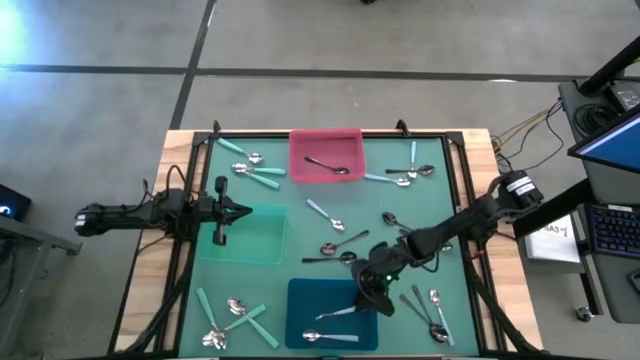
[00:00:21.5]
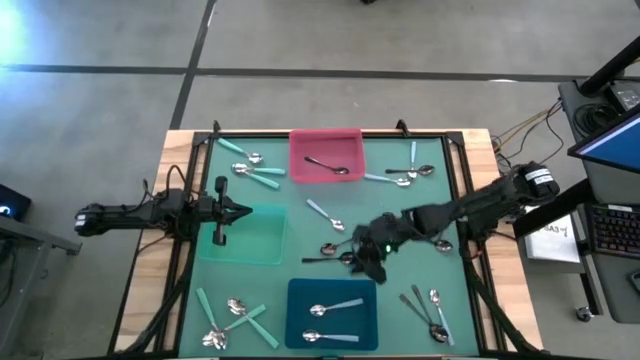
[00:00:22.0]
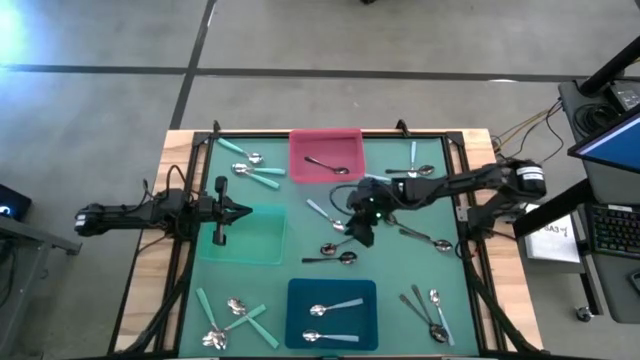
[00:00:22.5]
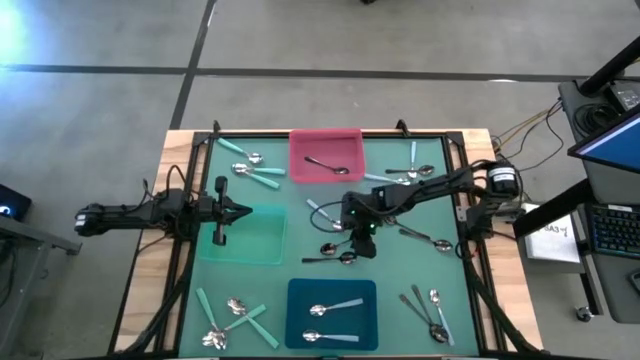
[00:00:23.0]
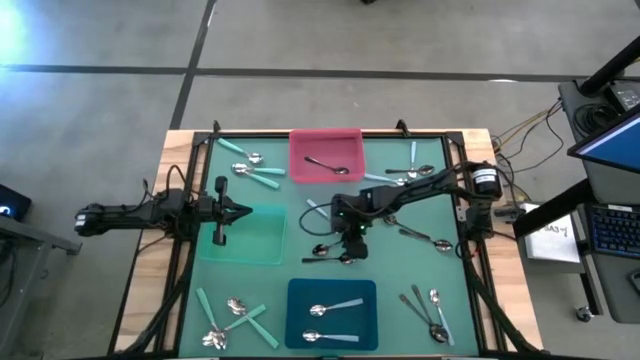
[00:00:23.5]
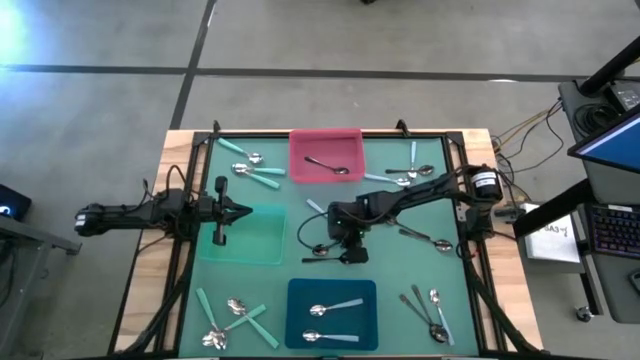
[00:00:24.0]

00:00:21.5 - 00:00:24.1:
Task: Sort silverware by color (type)
Put the black spoon into the red bin

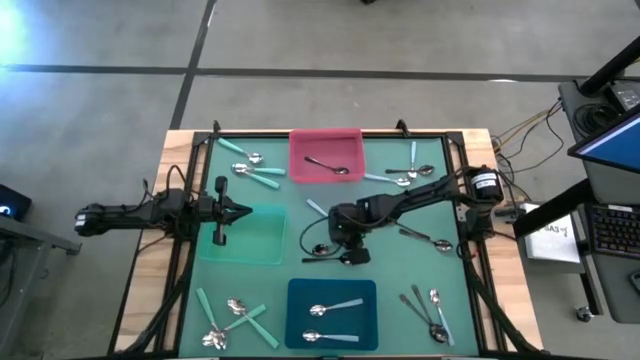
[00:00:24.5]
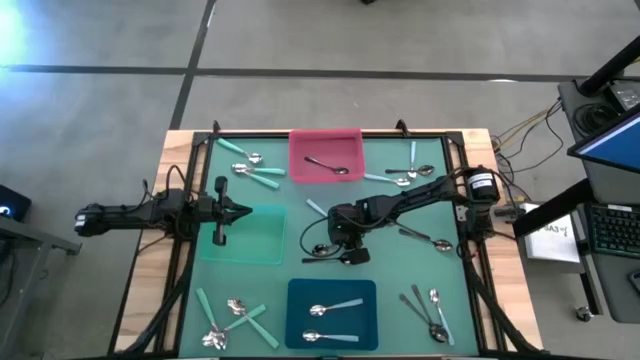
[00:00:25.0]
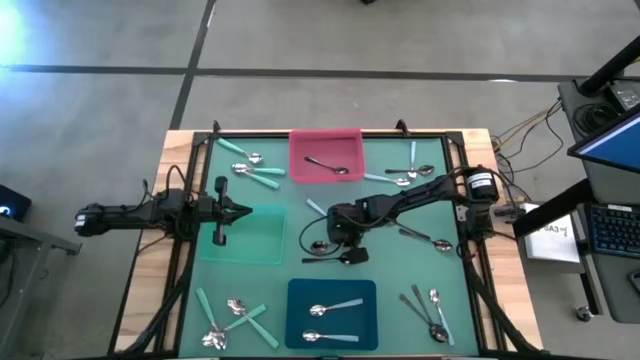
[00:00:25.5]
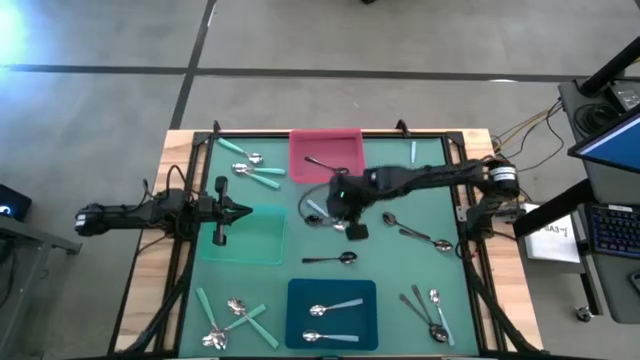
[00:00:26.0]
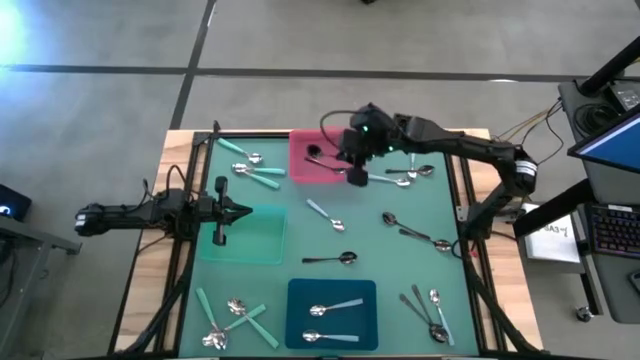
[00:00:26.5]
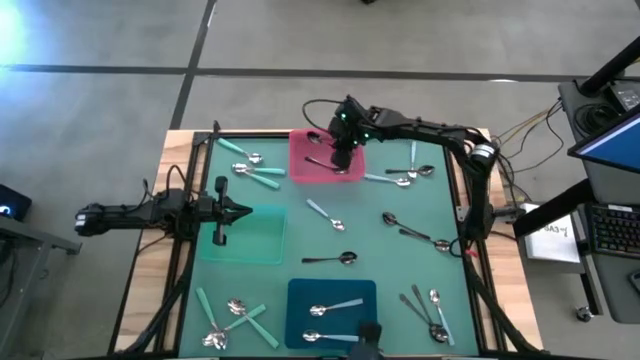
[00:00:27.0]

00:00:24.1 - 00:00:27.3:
Put the black spoon into the red bin

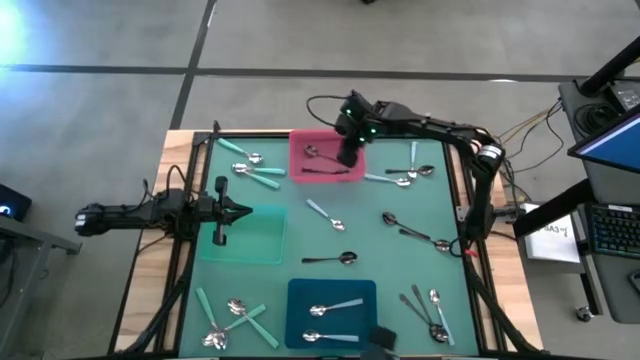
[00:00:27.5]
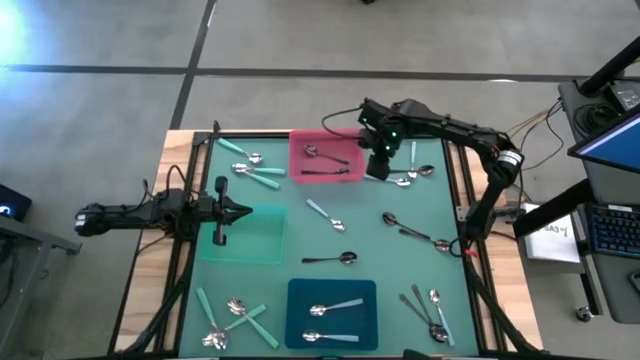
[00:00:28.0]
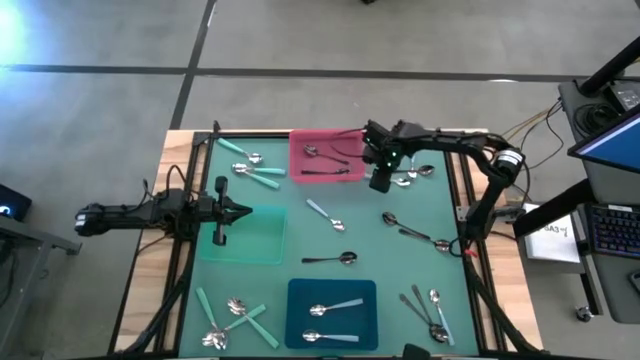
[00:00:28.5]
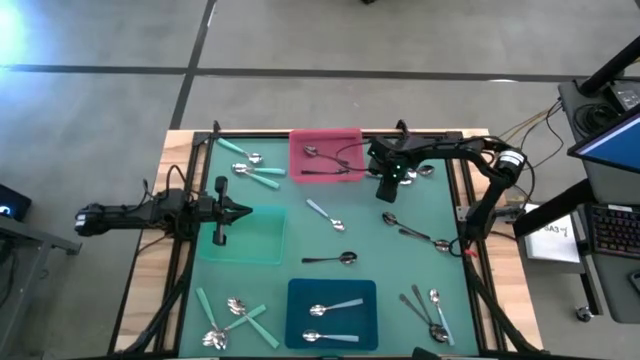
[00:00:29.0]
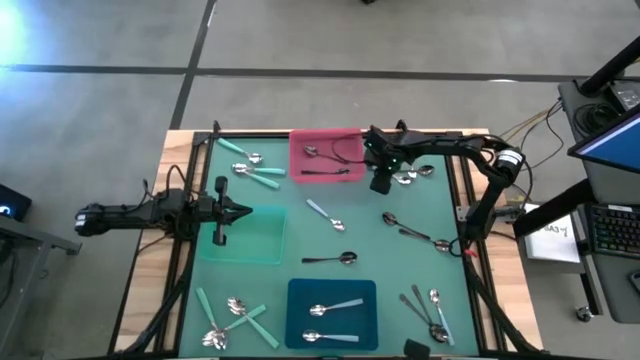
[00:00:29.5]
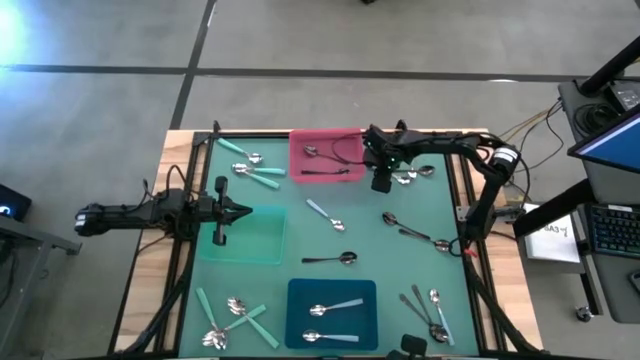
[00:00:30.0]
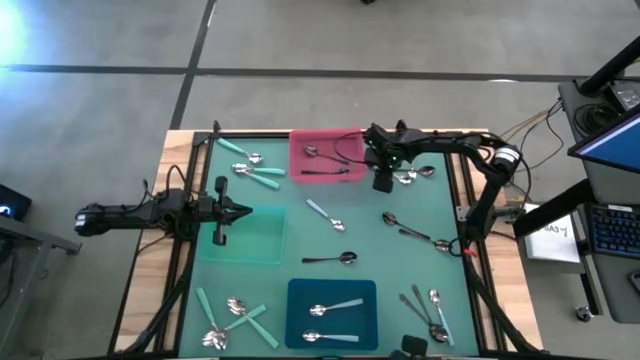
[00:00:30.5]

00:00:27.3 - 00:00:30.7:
Put the blue spoon into the blue bin

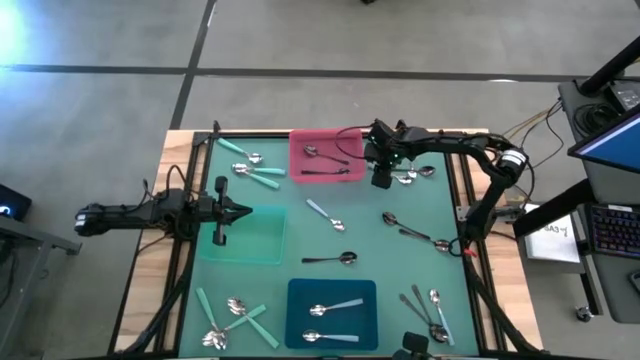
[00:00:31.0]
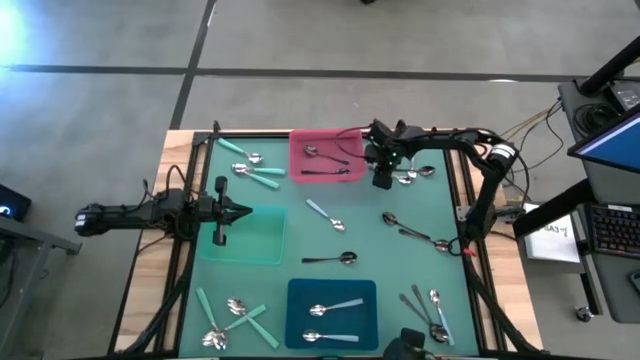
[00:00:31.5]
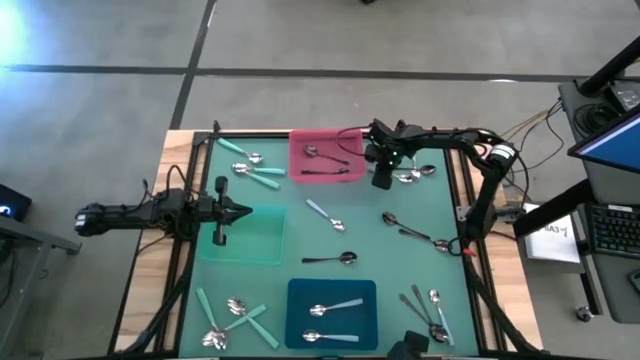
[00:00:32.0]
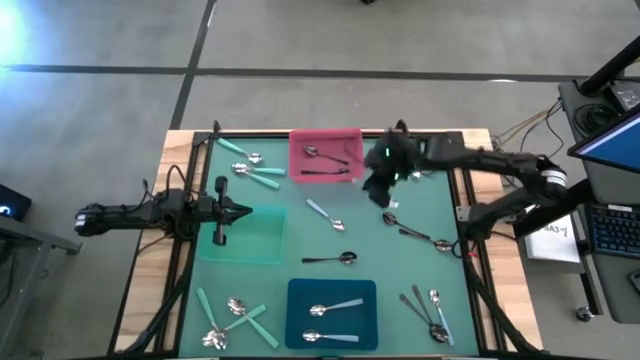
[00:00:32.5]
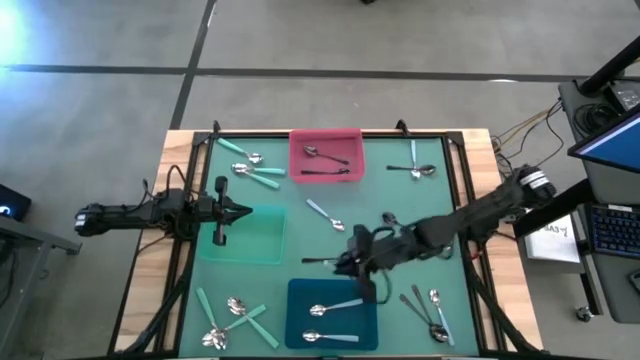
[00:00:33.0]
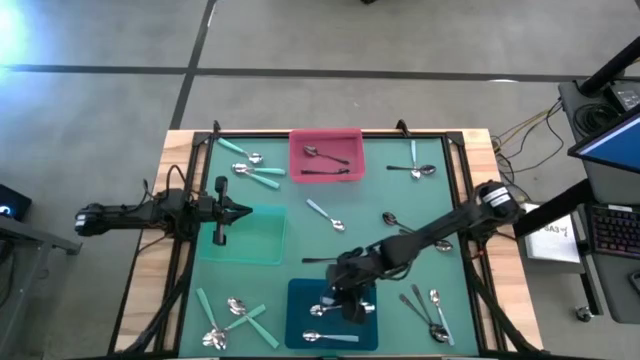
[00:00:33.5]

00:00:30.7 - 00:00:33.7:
Put the blue spoon into the blue bin

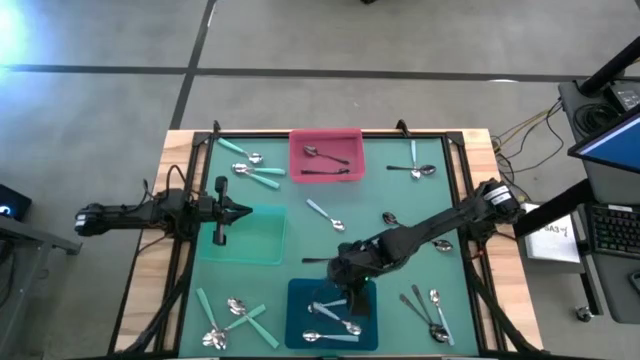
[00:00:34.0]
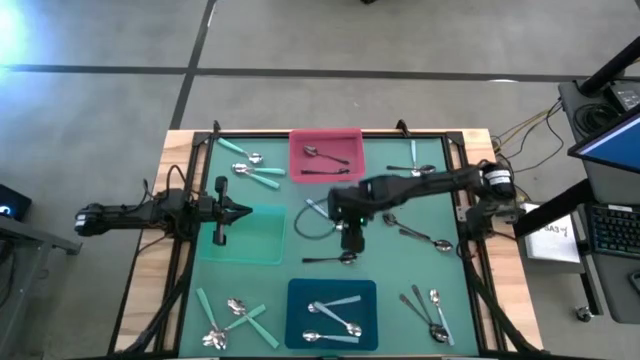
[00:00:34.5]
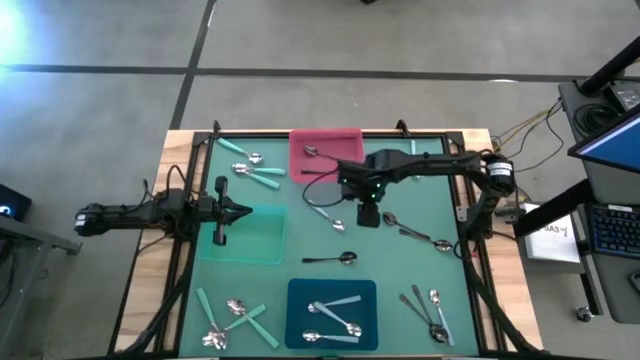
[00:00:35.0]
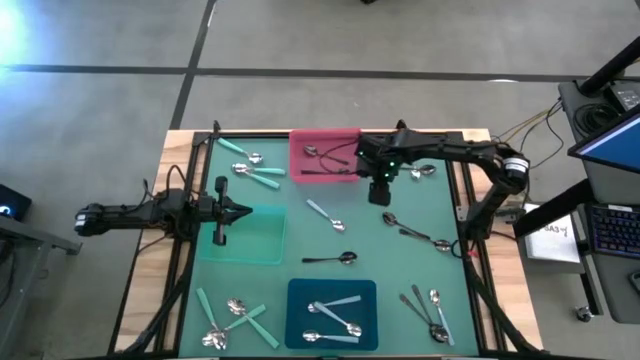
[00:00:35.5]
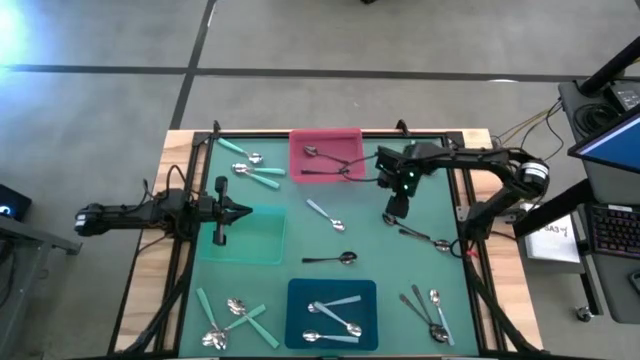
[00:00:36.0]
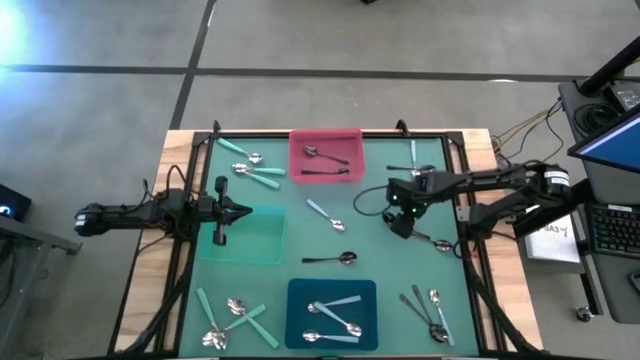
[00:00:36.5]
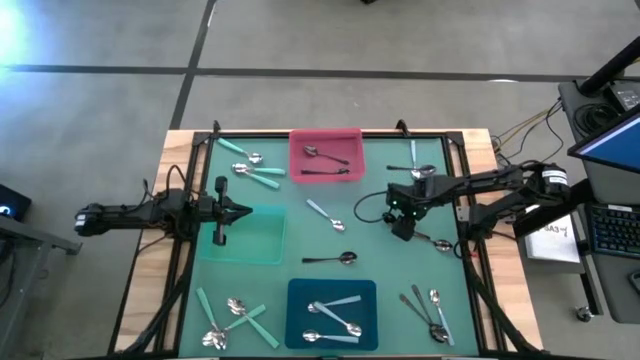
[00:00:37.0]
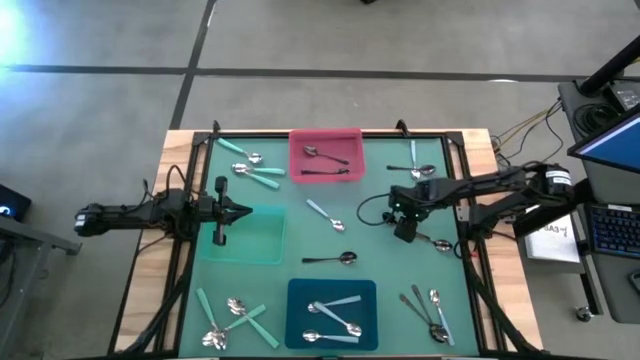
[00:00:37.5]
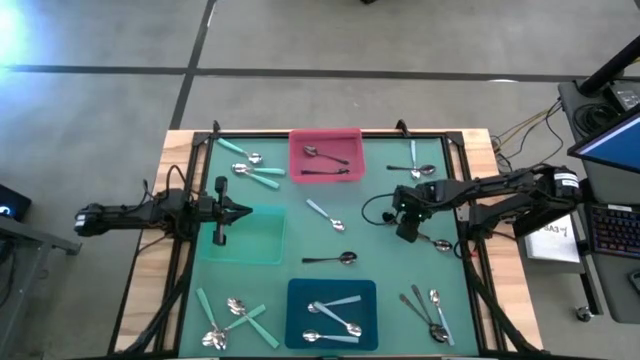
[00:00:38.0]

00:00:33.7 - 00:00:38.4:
Put the black spoon into the red bin

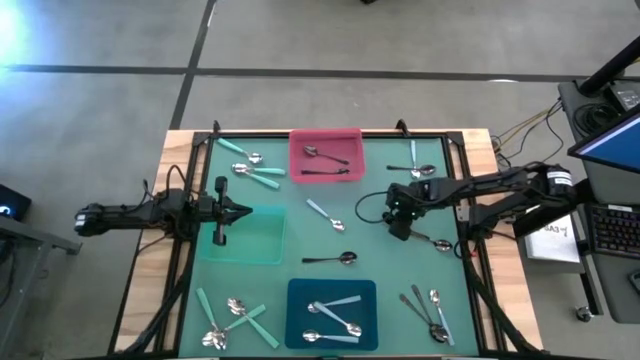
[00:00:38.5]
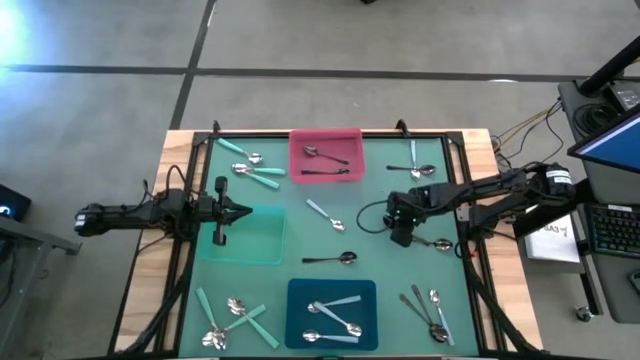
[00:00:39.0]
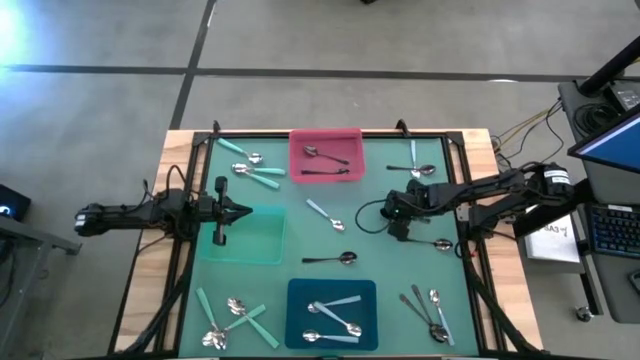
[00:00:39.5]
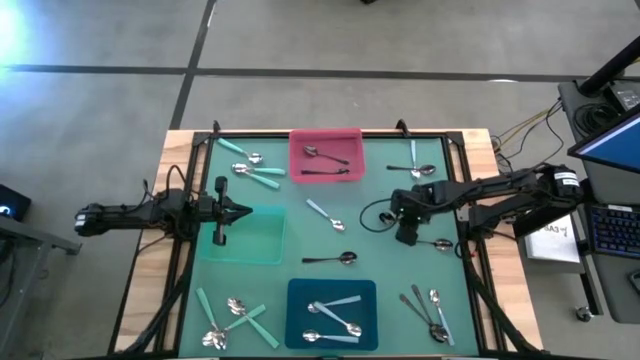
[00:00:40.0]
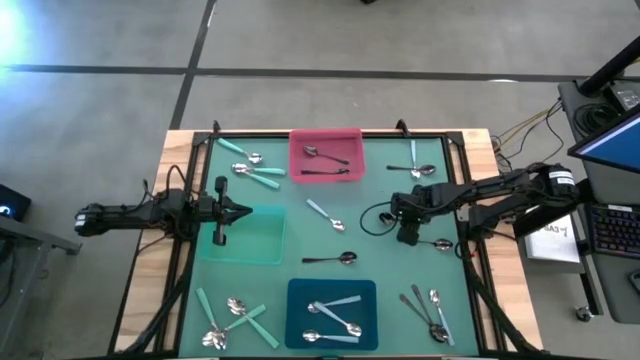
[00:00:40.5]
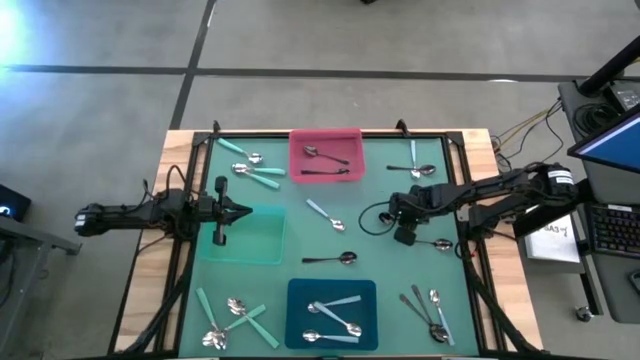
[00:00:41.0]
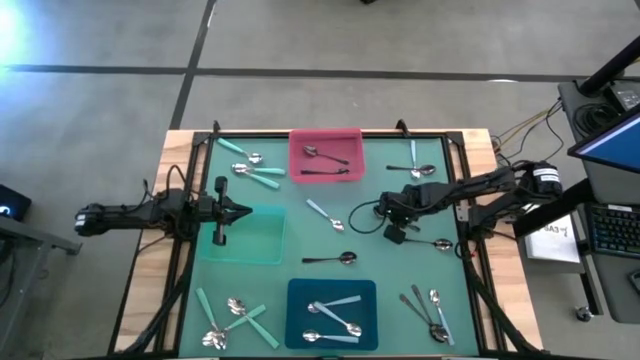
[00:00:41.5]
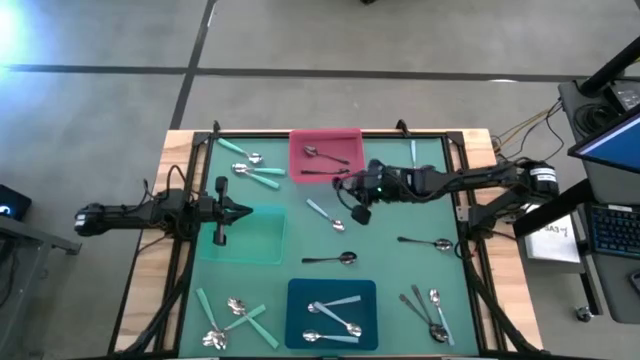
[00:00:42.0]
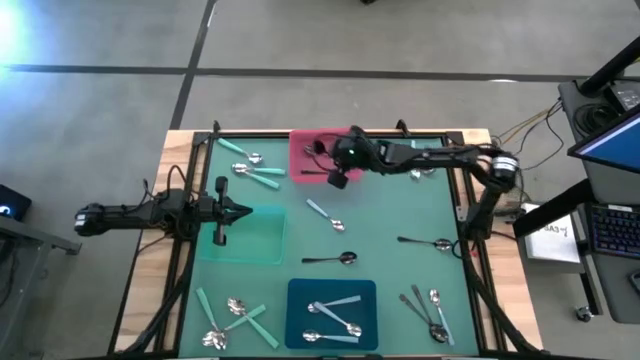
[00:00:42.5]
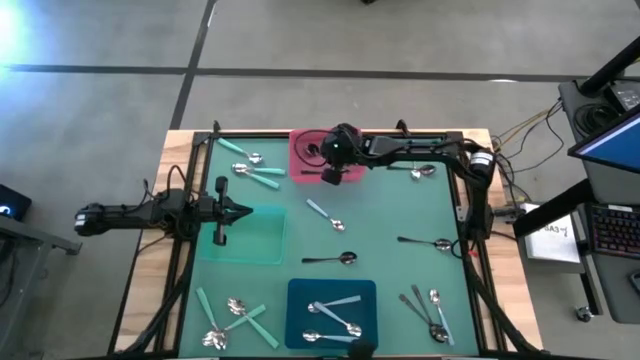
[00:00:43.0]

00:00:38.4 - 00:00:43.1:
Put the black spoon into the red bin
